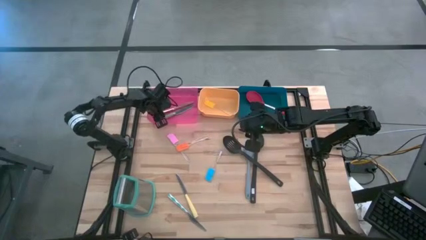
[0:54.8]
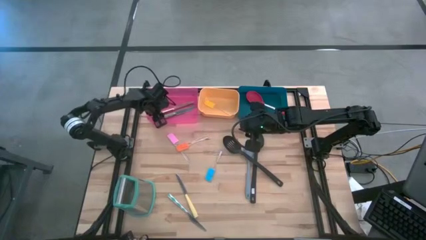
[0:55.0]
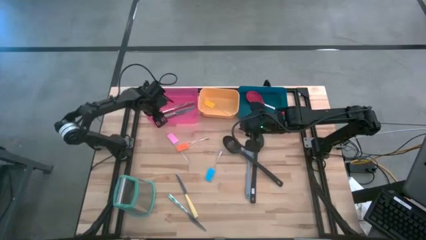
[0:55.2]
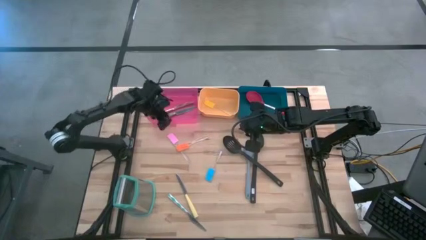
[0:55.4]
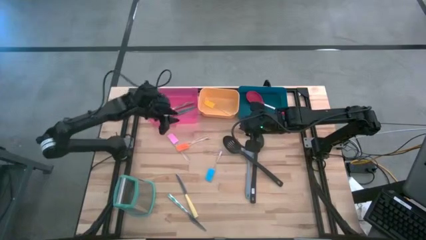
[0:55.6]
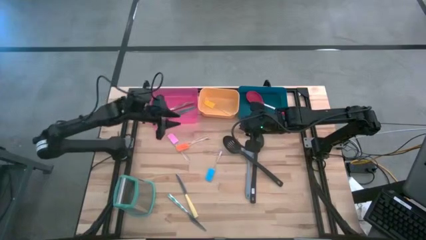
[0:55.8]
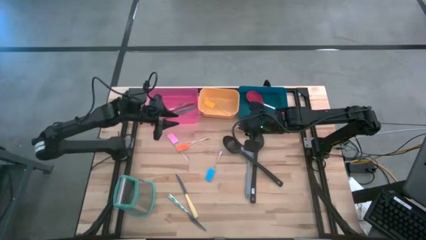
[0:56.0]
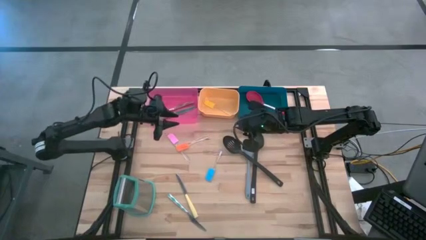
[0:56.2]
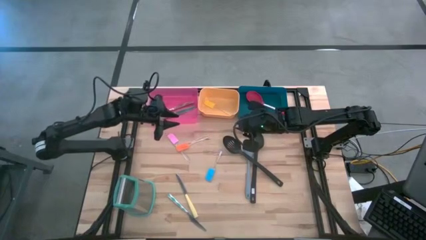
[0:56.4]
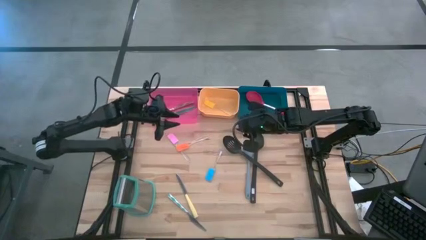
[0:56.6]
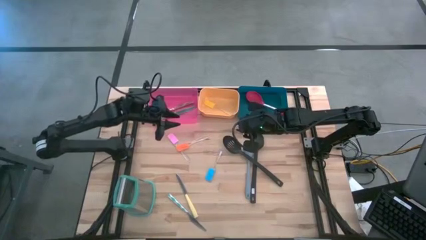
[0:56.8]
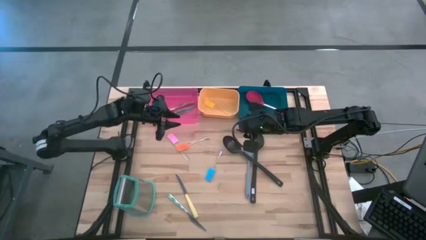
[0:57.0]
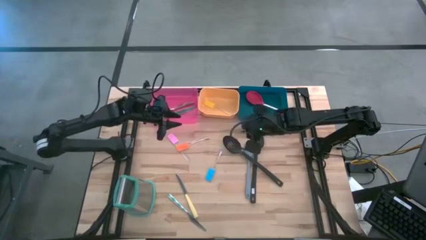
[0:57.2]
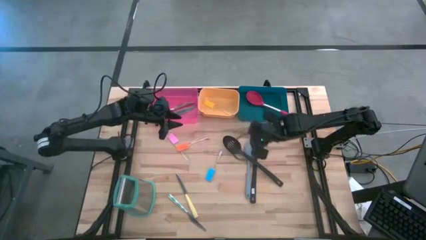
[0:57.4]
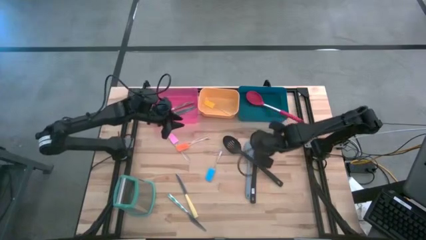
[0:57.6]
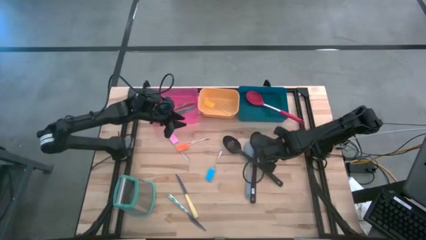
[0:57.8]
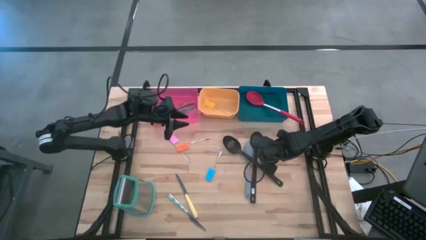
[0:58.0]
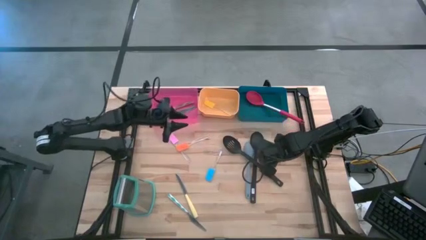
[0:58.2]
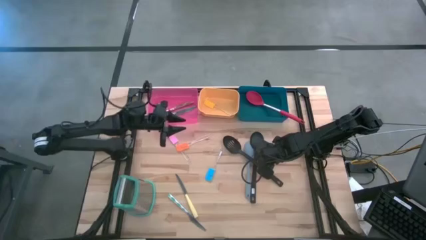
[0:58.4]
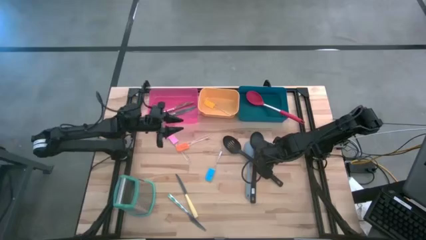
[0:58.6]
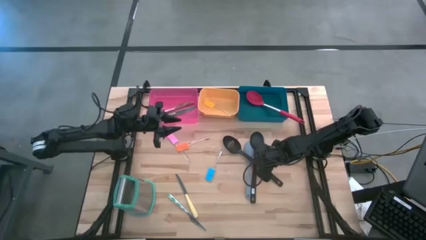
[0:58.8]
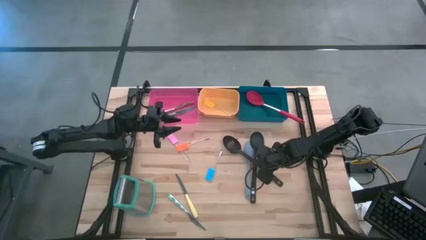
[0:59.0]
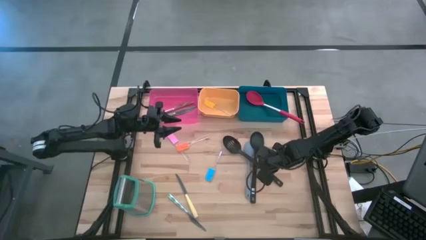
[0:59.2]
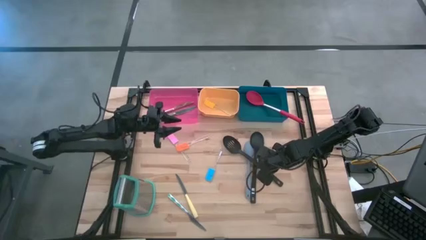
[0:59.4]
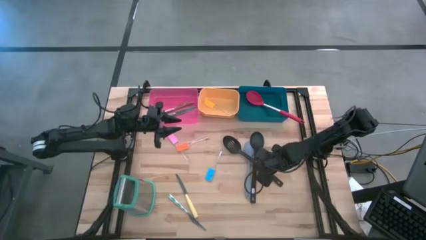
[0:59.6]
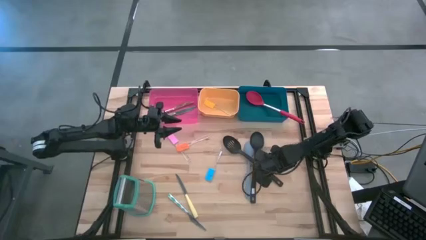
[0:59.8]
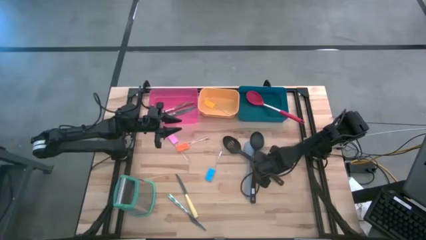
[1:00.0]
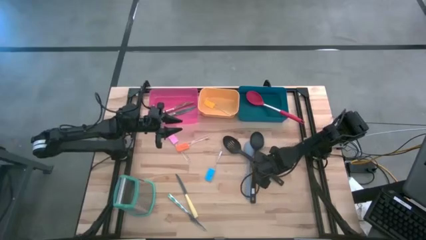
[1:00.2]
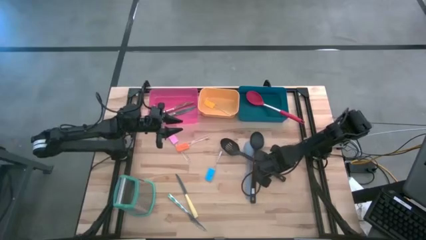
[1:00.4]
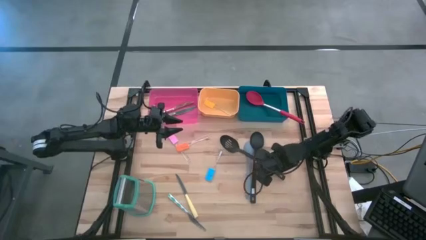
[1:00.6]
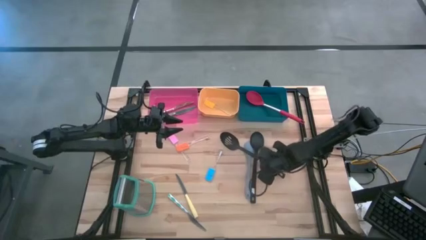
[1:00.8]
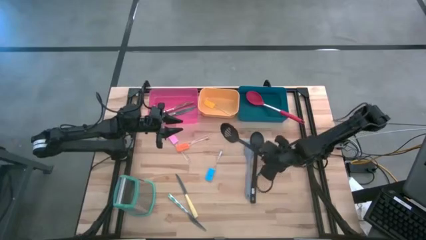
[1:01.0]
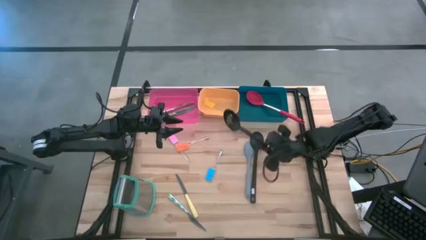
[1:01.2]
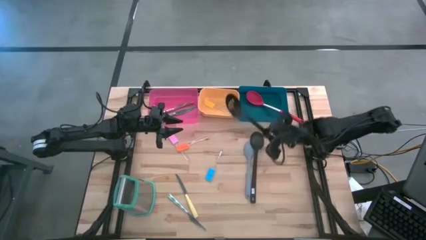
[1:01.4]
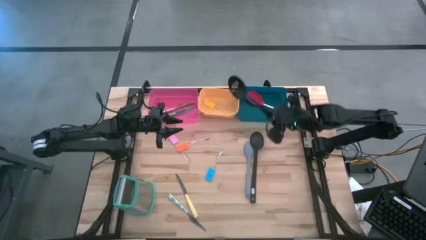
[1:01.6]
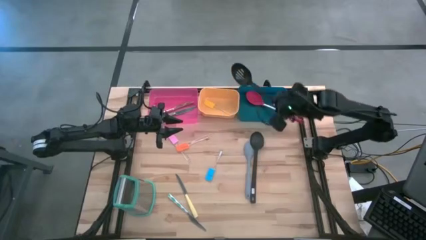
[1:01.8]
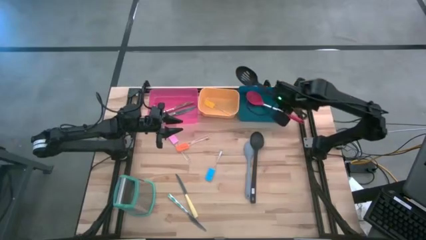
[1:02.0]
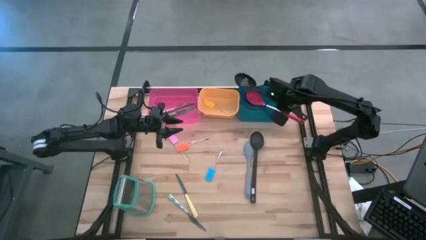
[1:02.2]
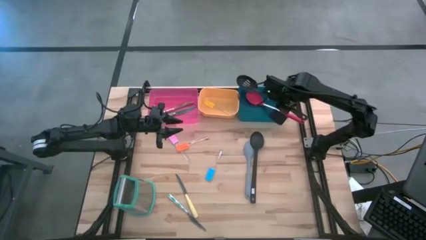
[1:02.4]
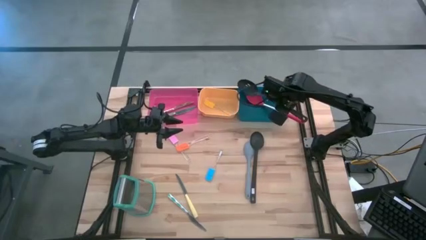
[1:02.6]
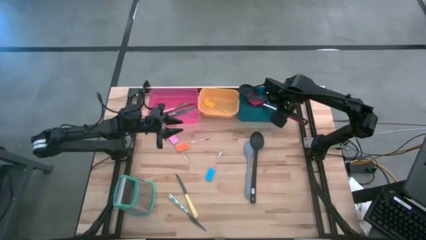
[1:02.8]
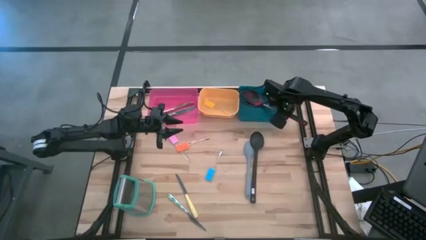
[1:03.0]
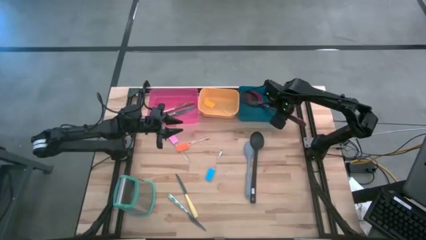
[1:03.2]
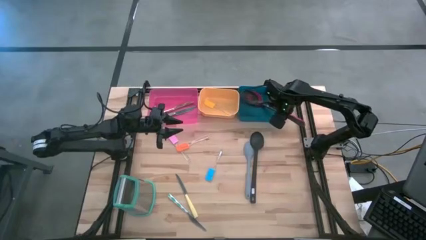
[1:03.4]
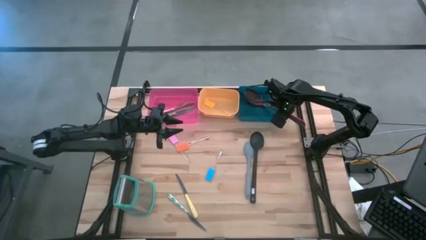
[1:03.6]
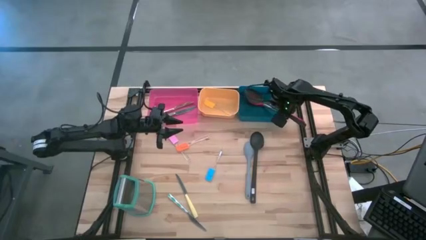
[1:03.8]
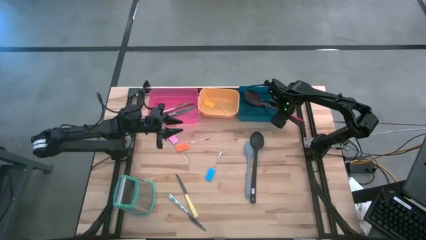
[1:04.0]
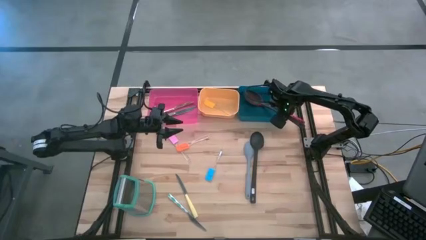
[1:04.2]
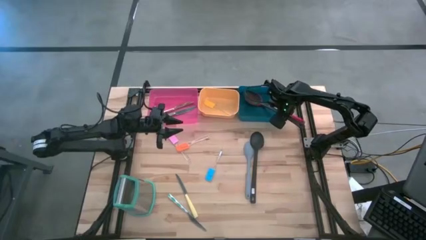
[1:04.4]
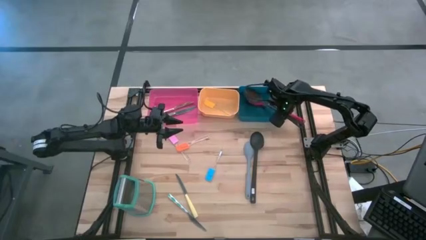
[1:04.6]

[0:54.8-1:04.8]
Task: Pick & Place Kitchen Items
Put the black spoon into the blue bin

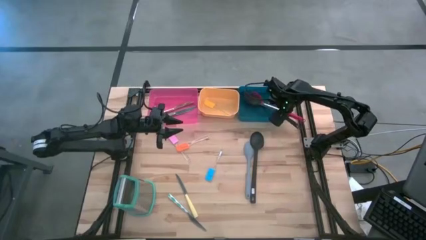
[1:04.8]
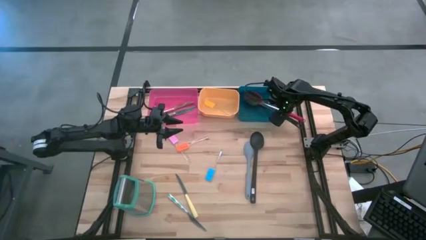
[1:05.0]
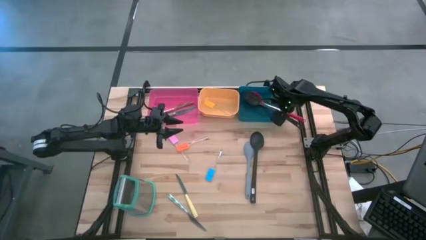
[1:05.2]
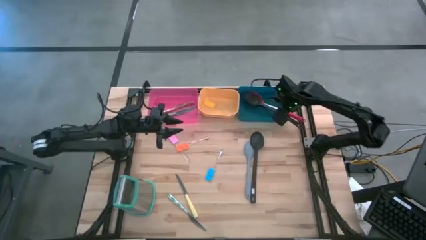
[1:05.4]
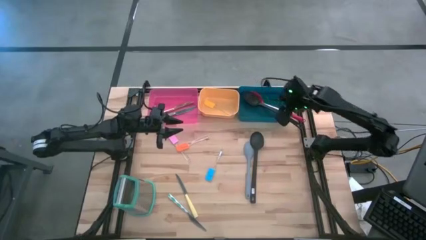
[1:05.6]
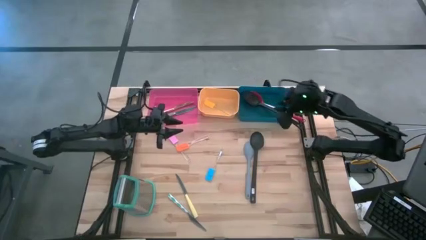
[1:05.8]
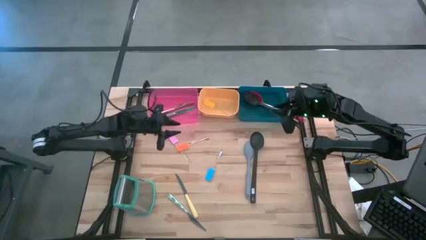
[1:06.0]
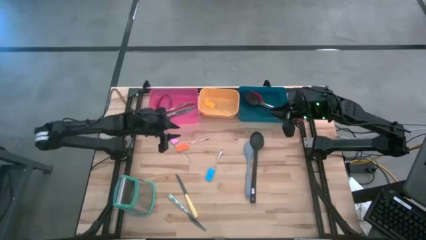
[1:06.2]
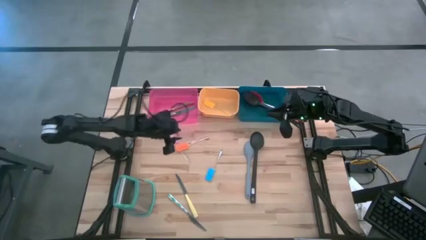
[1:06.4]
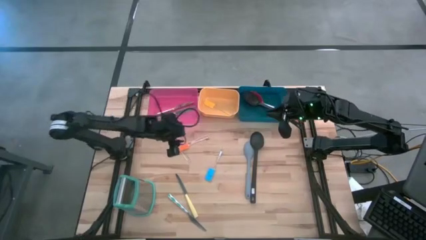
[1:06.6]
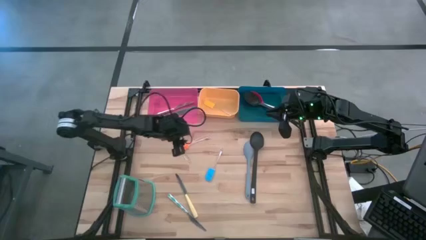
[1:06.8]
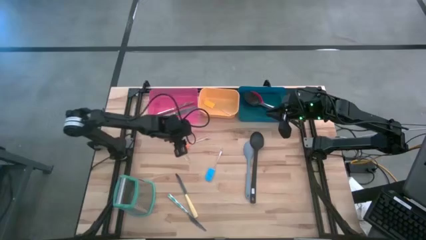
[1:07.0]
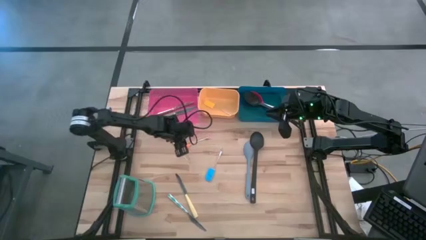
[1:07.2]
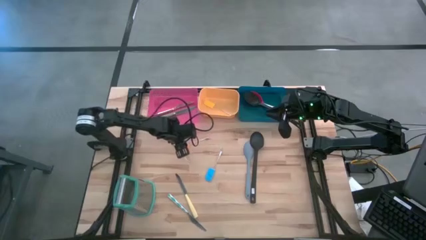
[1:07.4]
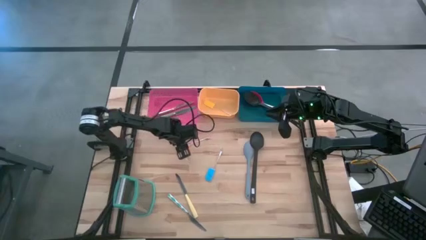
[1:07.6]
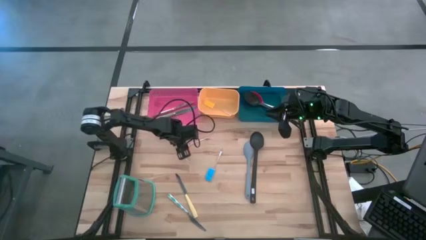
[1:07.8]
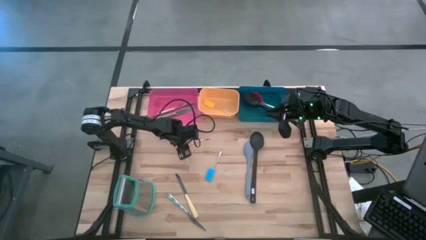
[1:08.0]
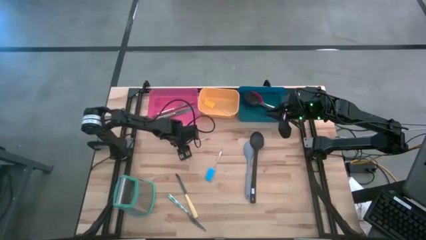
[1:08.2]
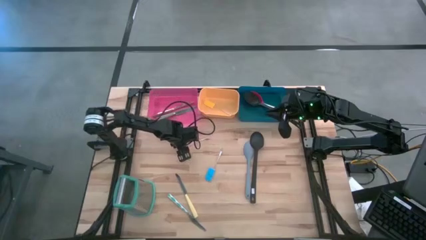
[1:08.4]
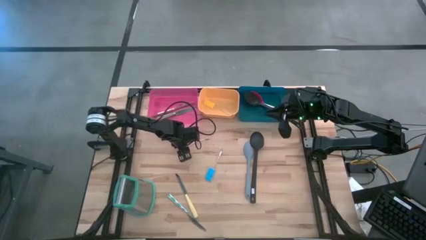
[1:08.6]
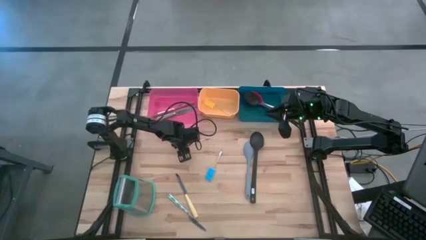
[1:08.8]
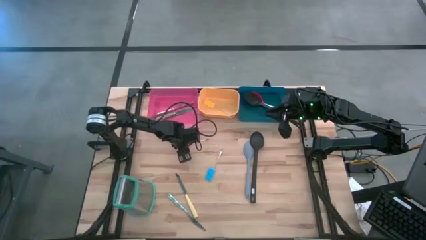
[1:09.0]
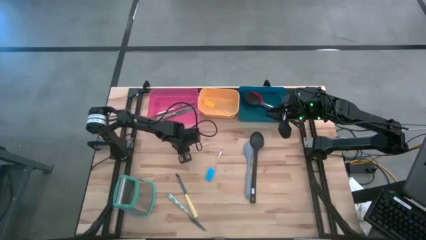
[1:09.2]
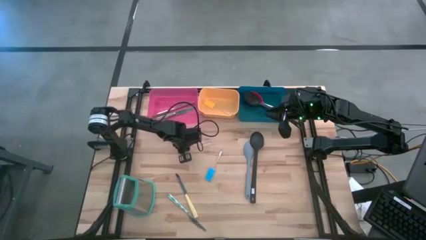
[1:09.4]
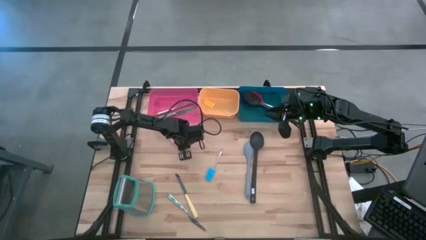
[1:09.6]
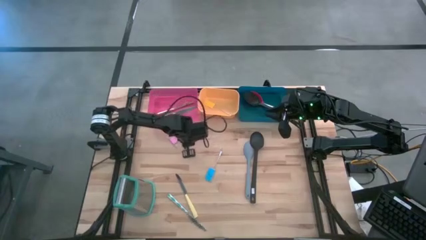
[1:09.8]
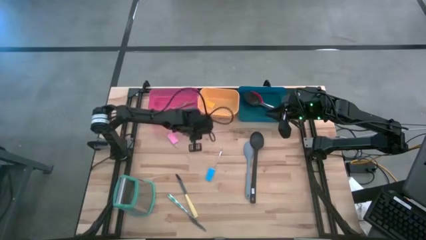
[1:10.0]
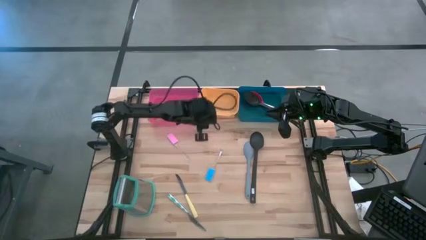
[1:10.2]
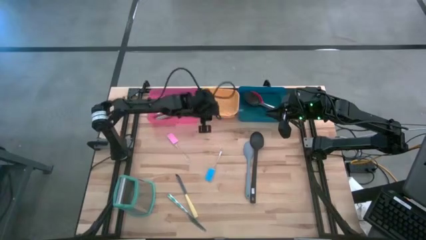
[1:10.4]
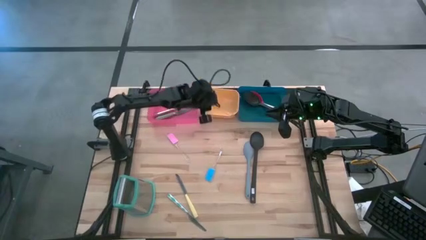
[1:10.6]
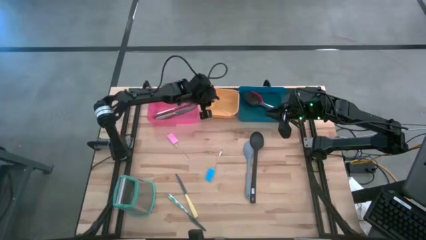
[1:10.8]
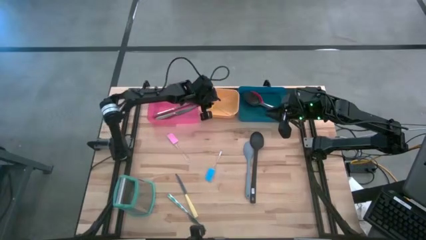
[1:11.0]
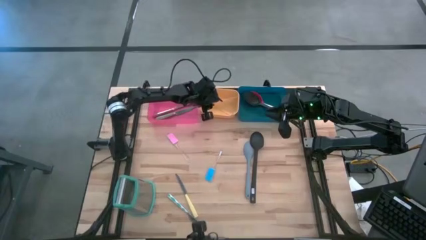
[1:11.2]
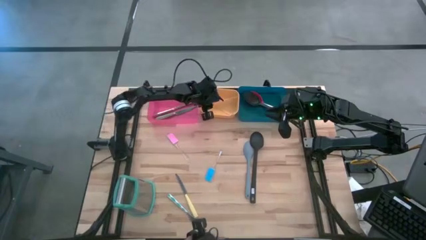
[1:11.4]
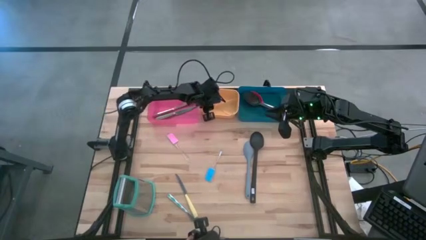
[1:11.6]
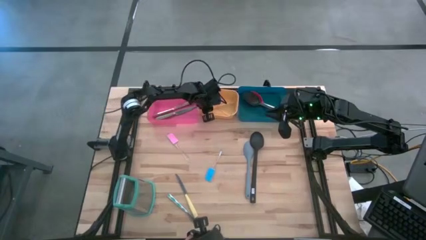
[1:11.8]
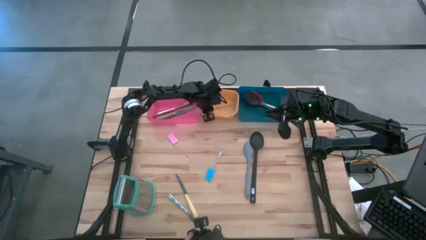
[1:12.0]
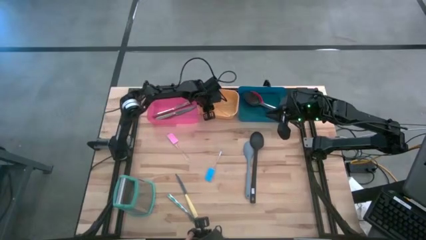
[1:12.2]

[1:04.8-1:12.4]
Put the orange spatula into the yellow bin
